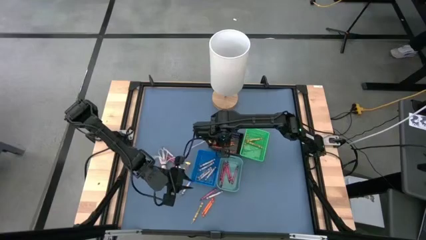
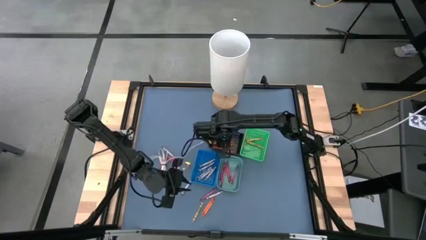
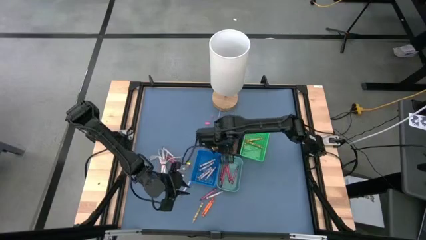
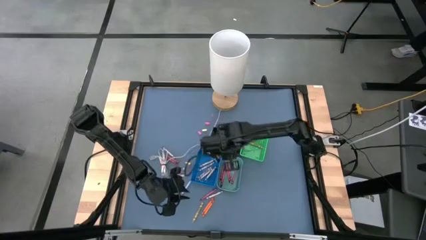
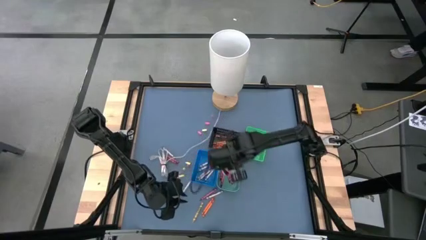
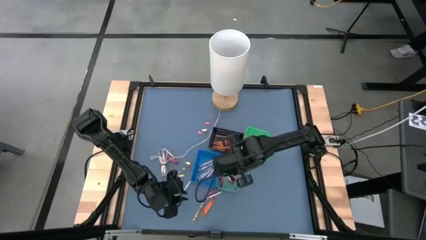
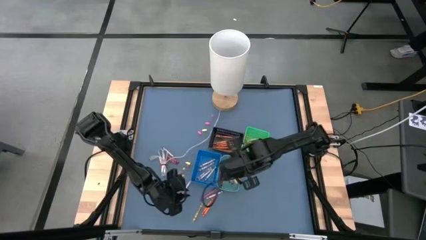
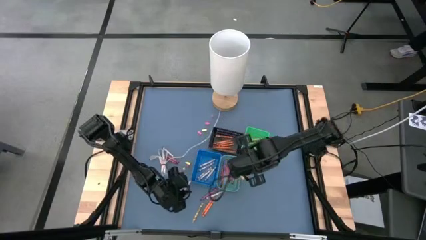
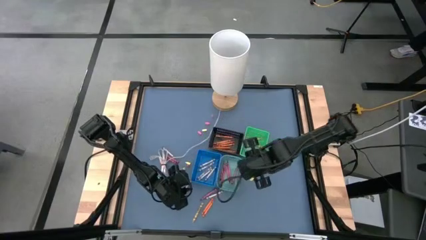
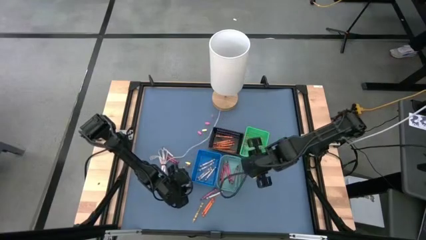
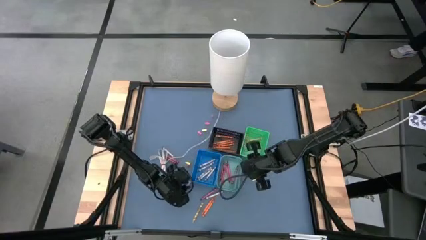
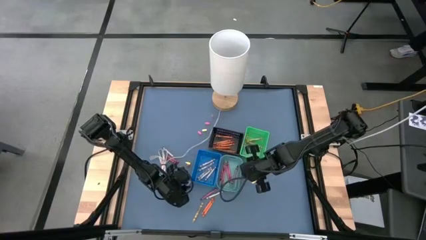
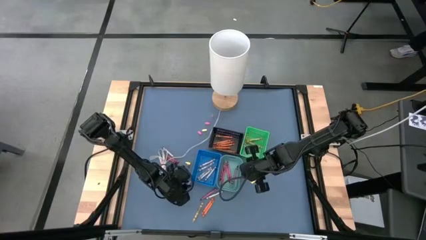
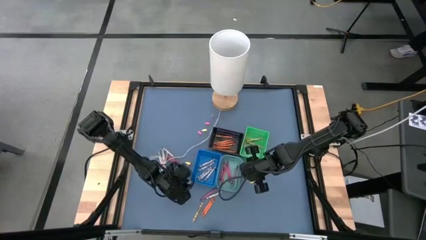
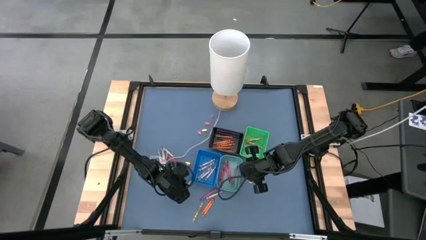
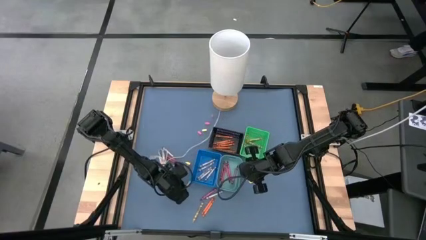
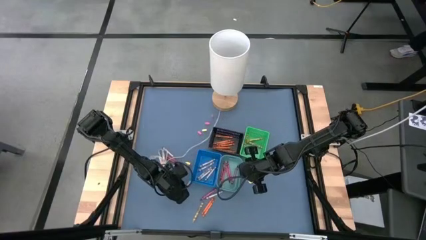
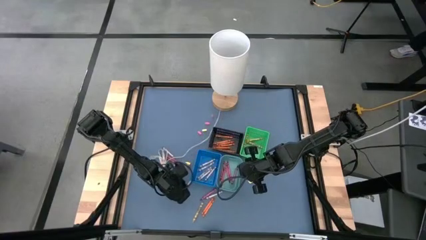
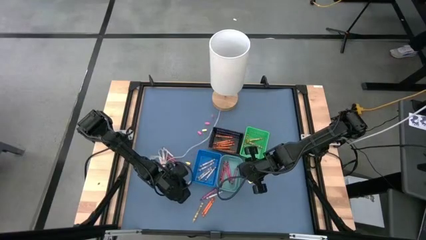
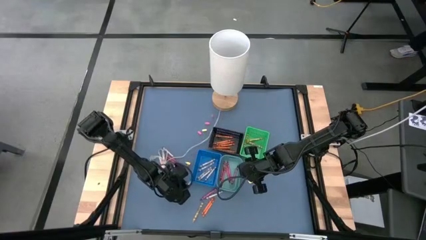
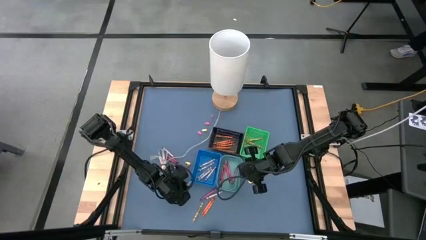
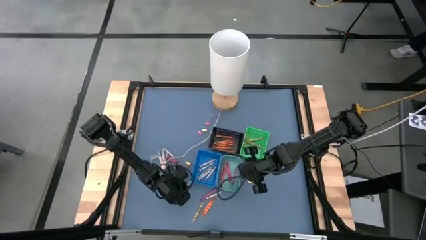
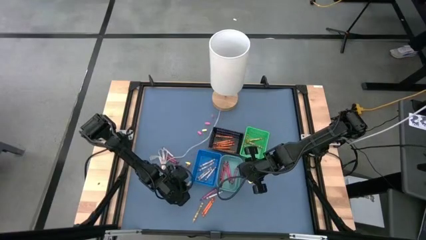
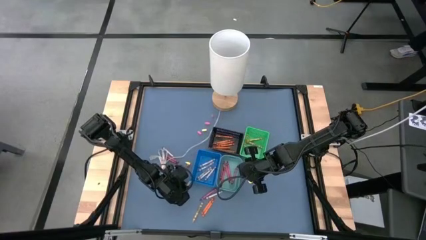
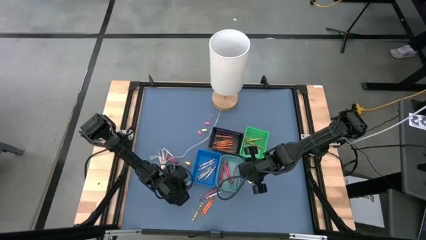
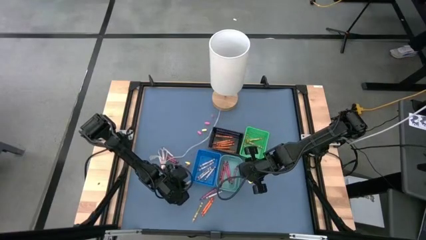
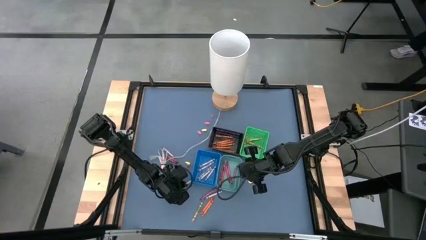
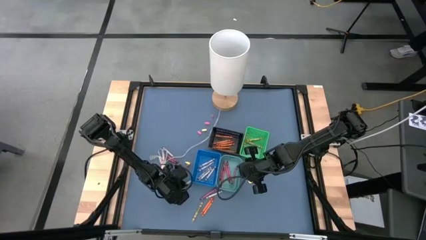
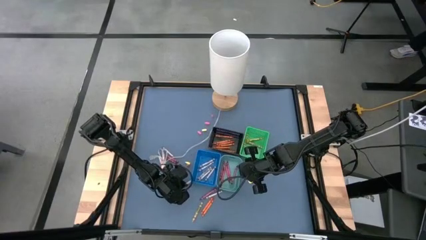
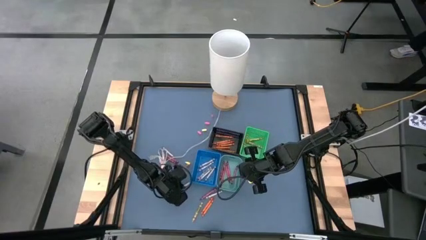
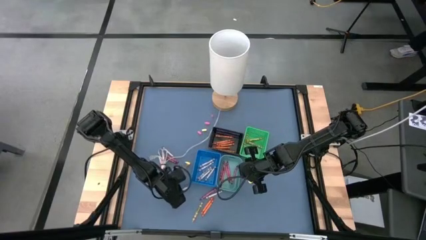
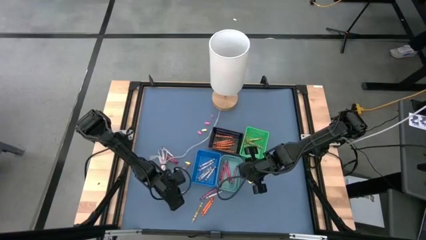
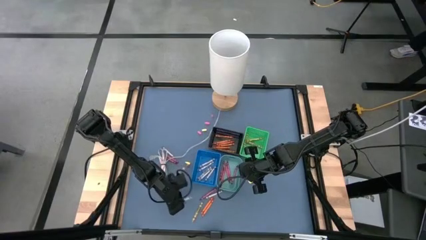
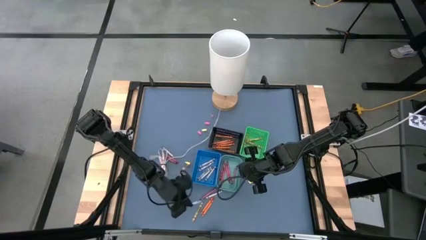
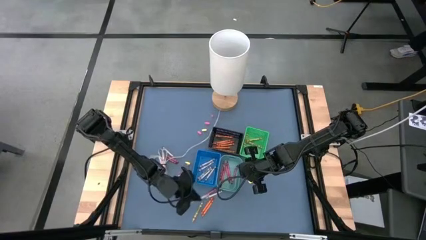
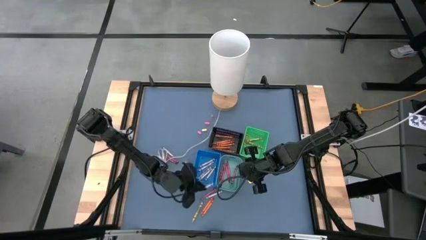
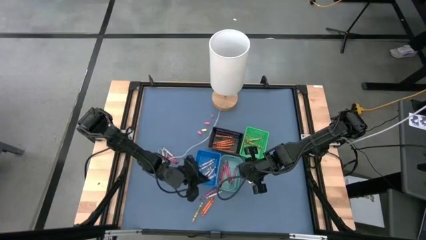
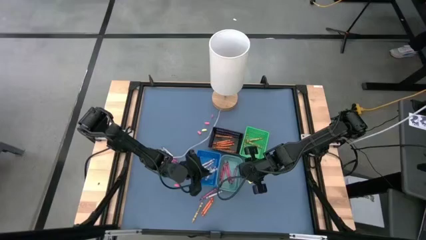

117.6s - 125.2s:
Task: Sort crayons
Put the gray crayon into the blue bin

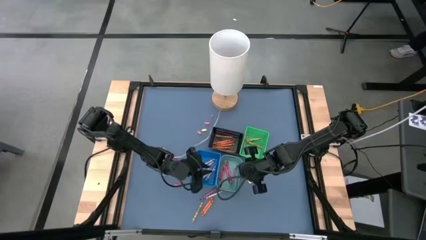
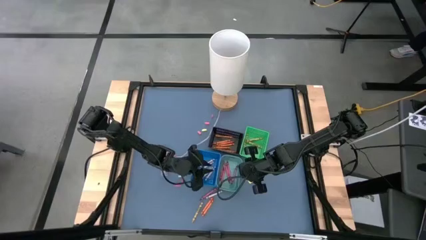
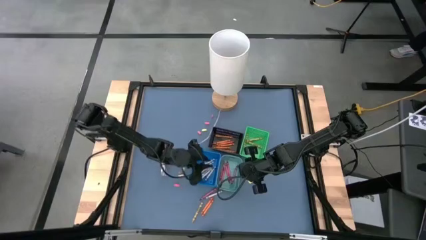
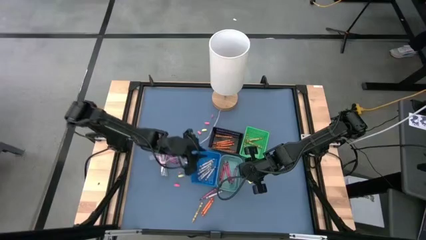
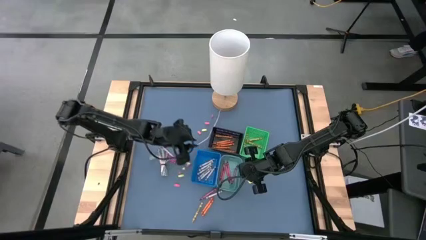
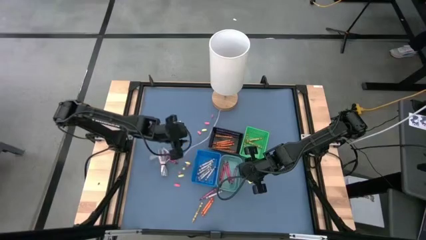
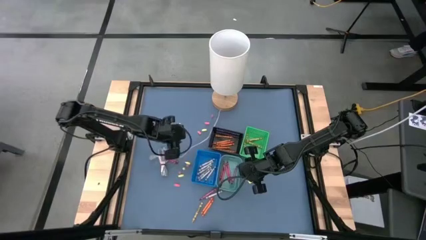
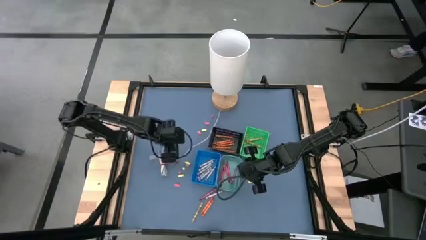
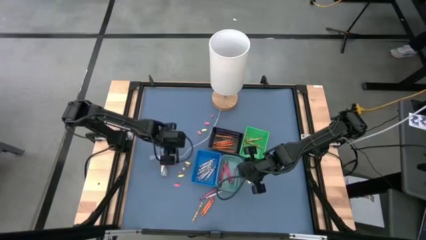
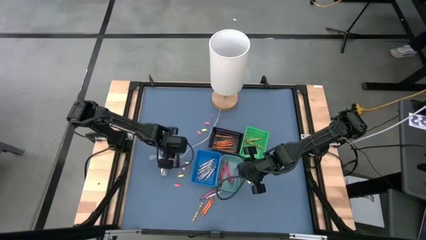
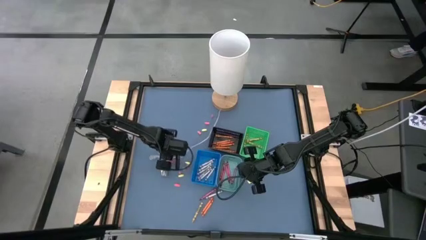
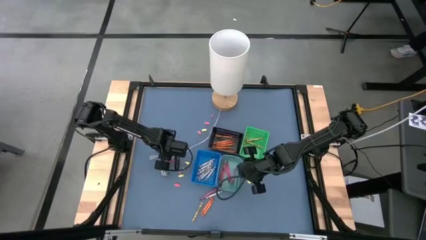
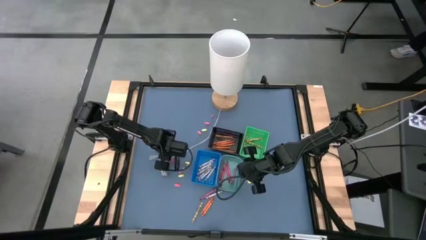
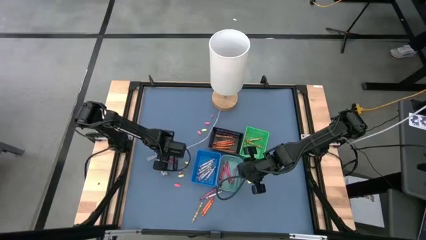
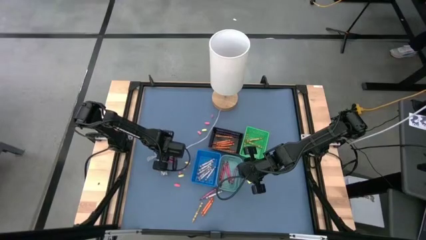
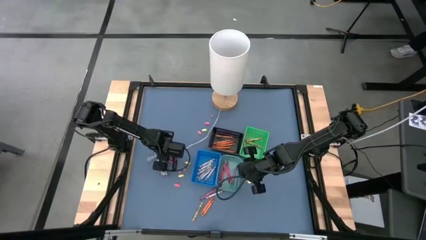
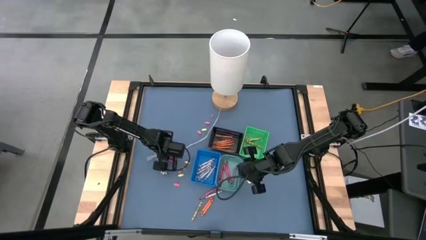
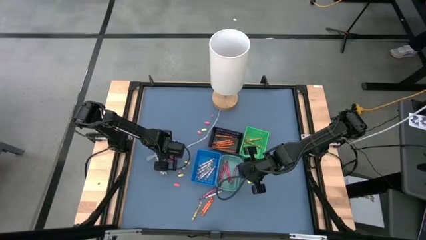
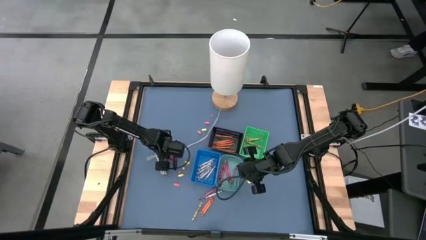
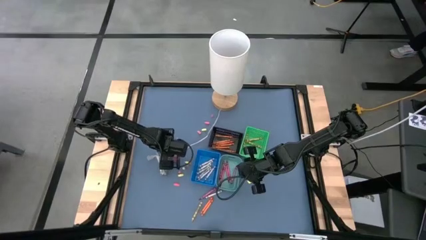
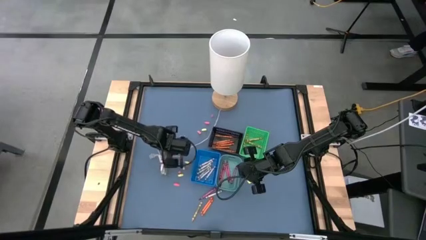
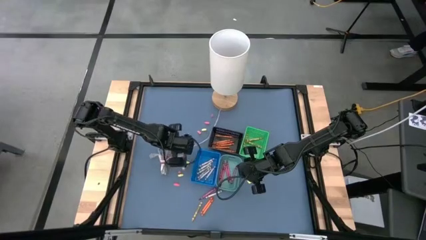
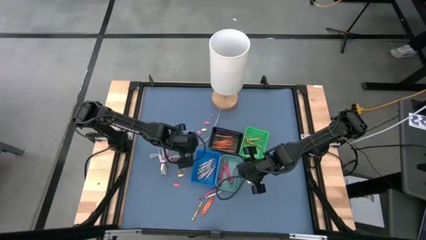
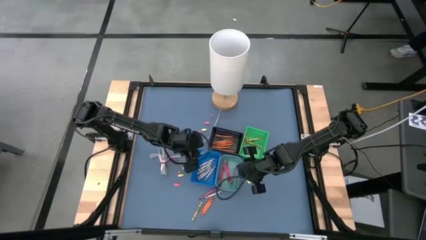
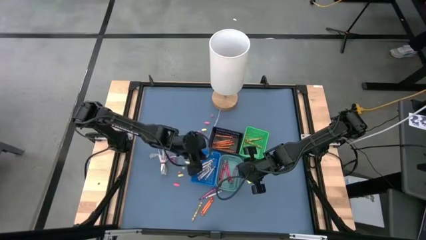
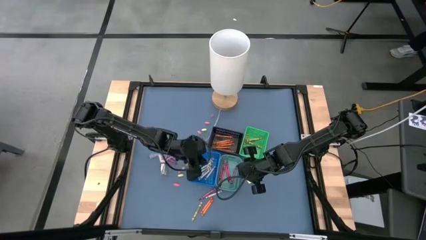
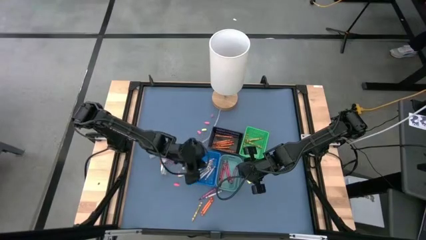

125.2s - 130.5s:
Put the gray crayon into the blue bin

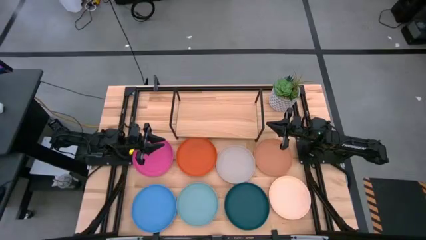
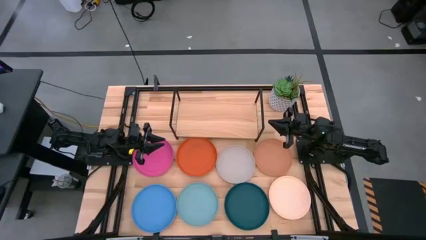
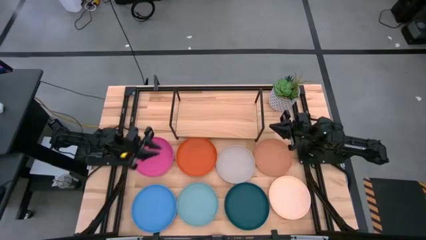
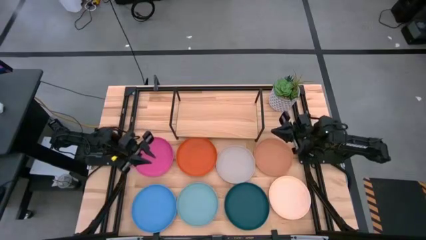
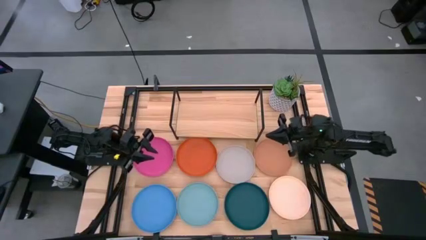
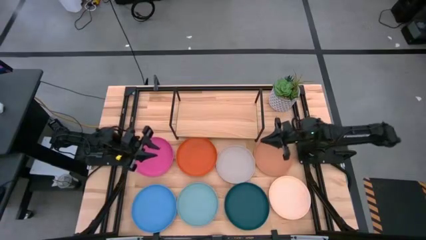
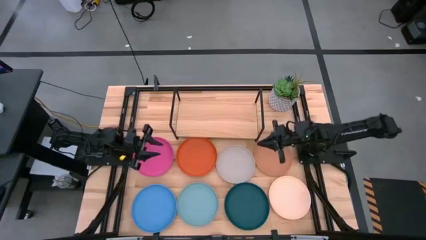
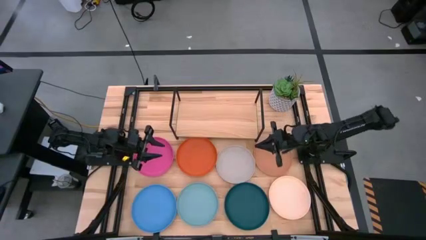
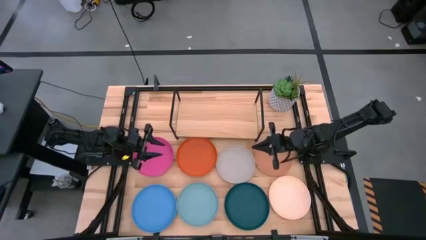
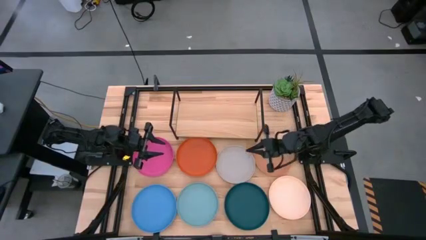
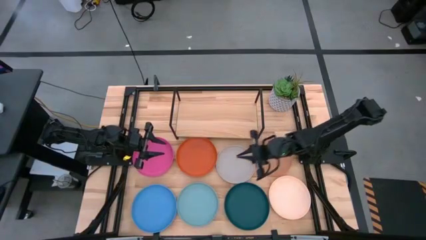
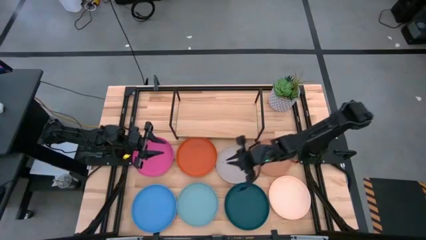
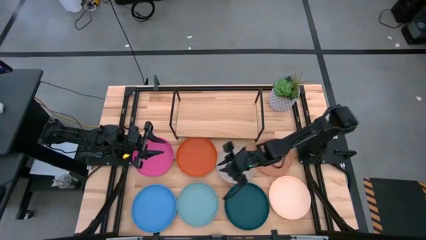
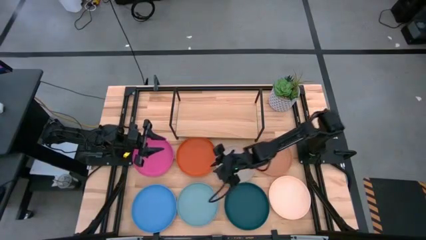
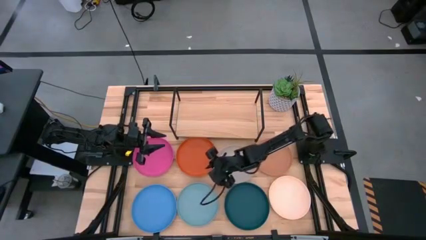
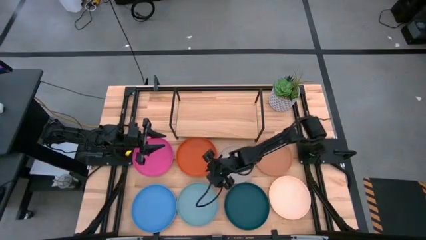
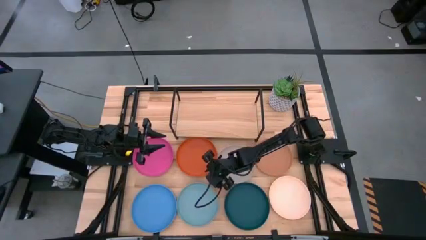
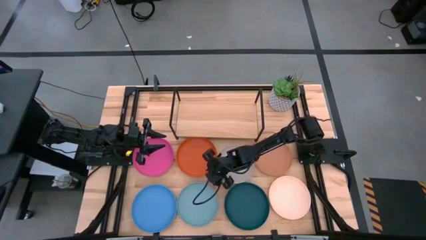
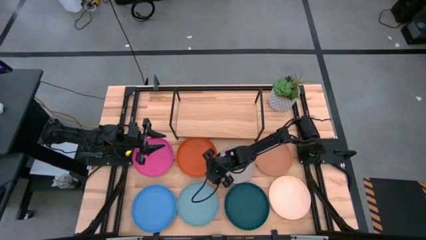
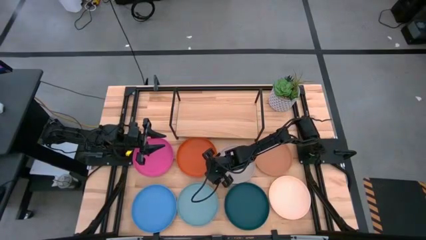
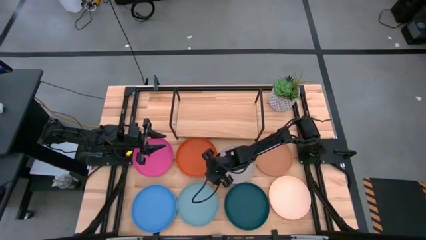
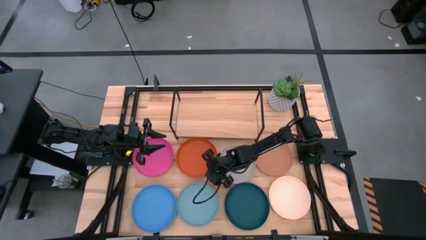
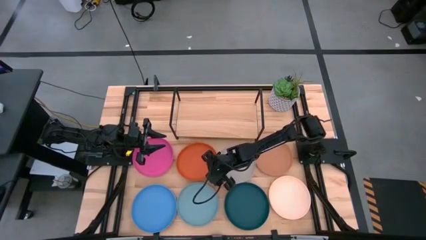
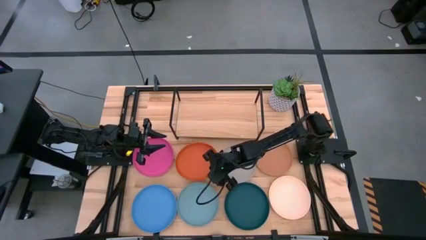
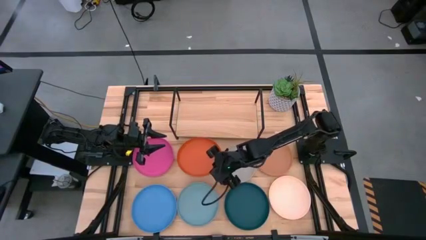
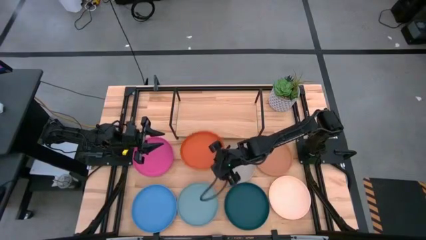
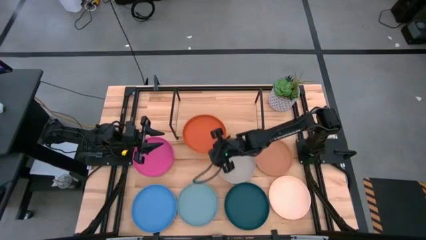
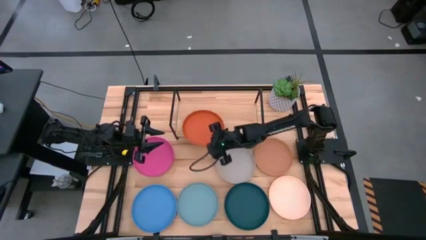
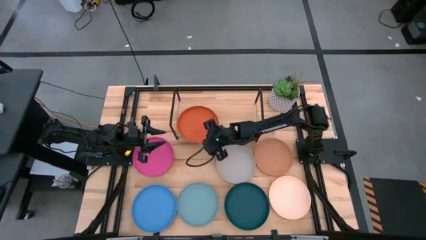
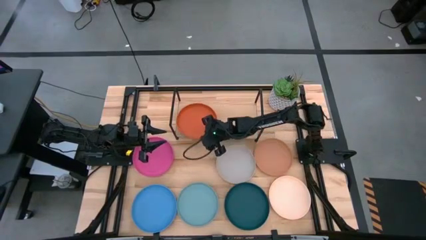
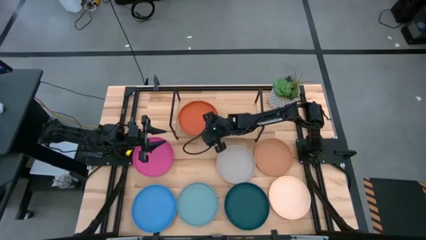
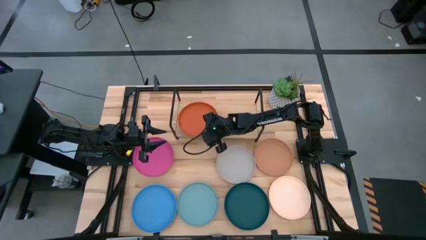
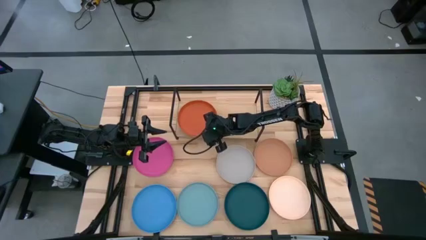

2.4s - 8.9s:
Task: Place and stack plates onto a shelf
Put the orange plate on the shelf
